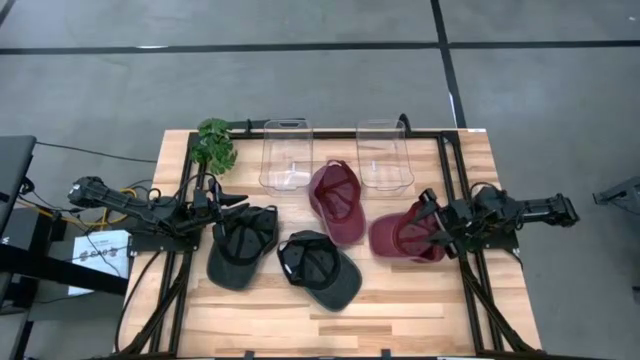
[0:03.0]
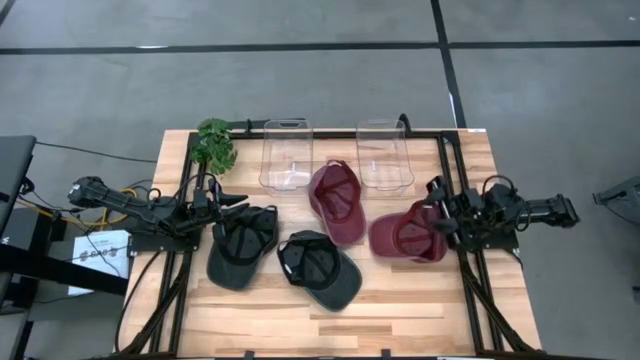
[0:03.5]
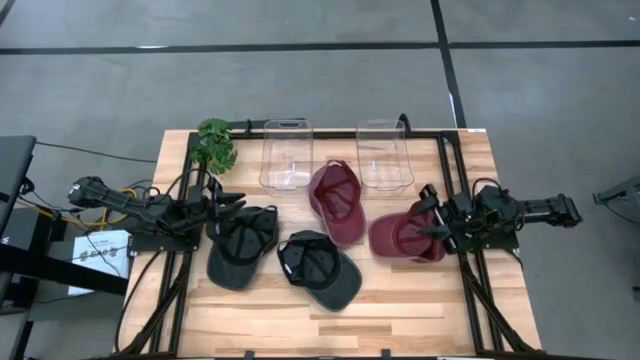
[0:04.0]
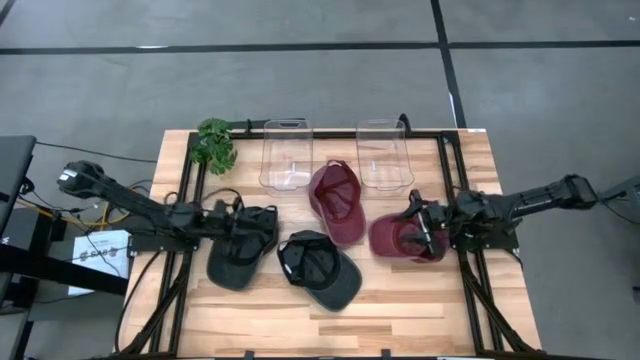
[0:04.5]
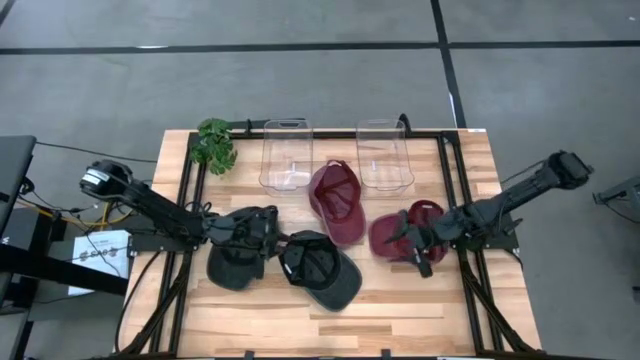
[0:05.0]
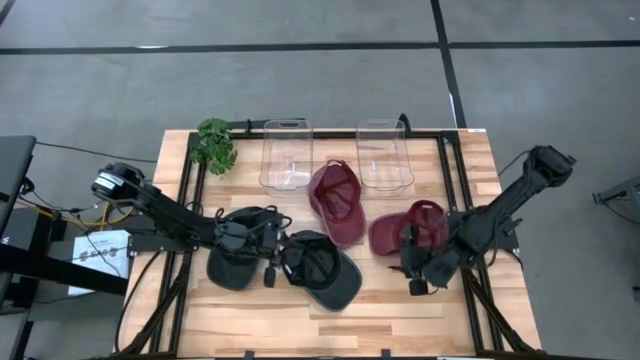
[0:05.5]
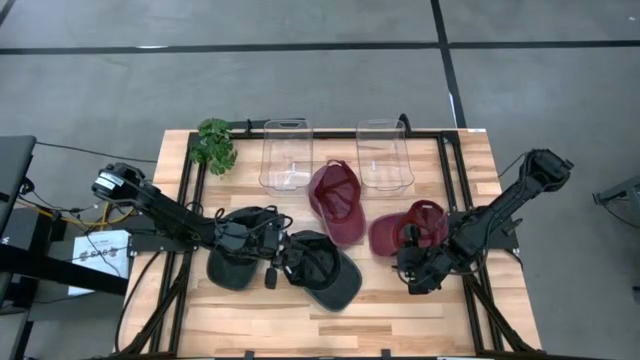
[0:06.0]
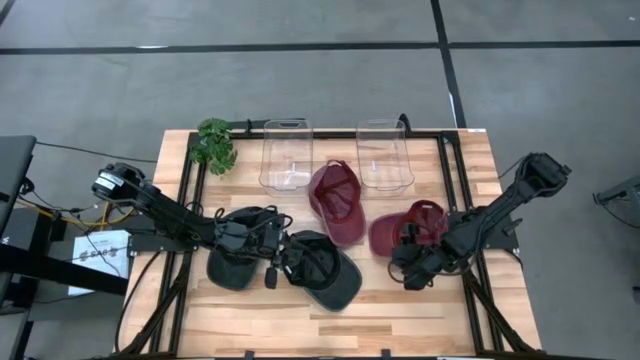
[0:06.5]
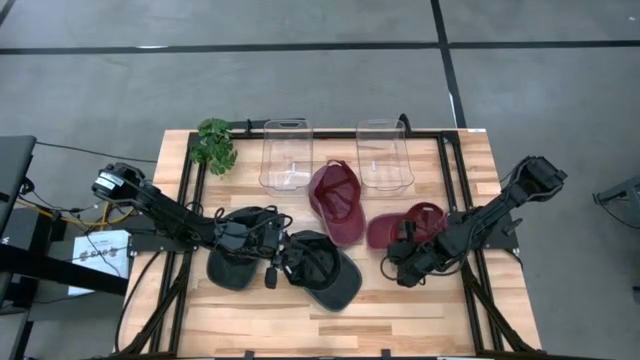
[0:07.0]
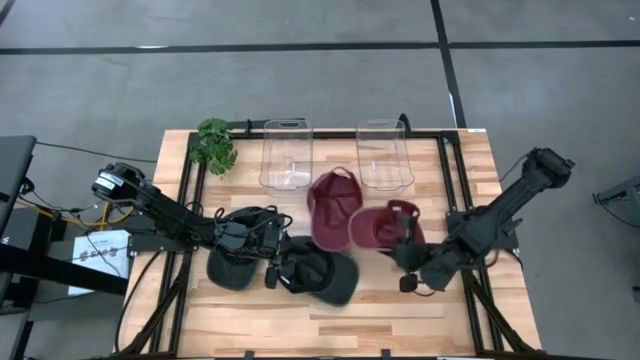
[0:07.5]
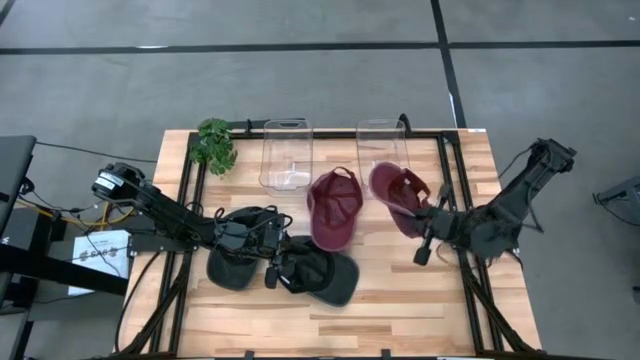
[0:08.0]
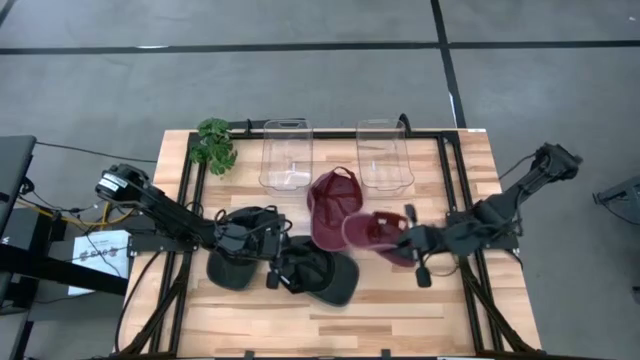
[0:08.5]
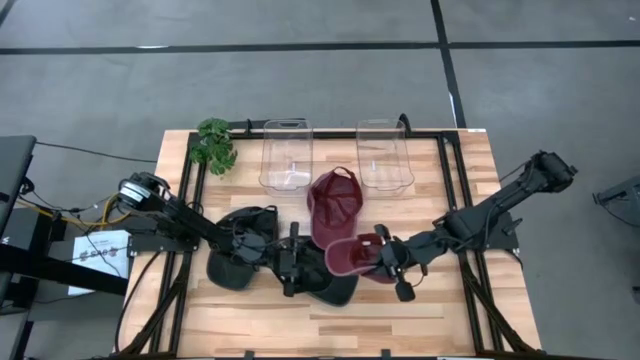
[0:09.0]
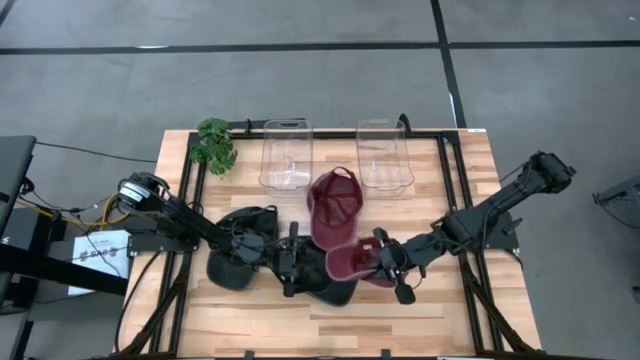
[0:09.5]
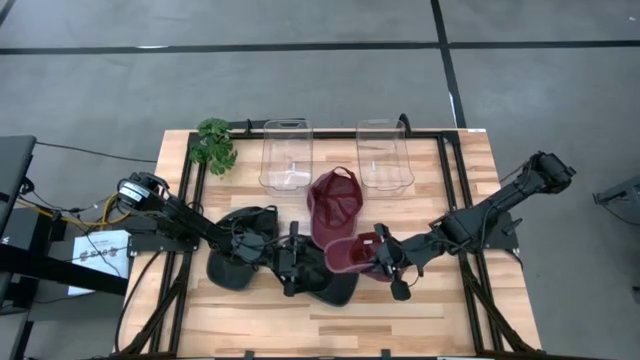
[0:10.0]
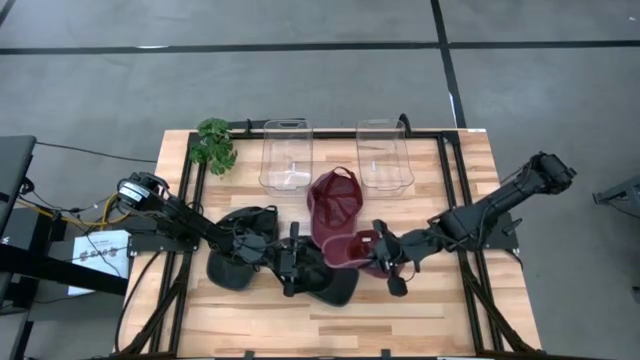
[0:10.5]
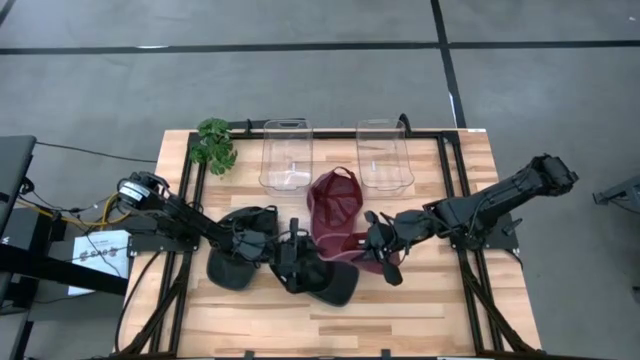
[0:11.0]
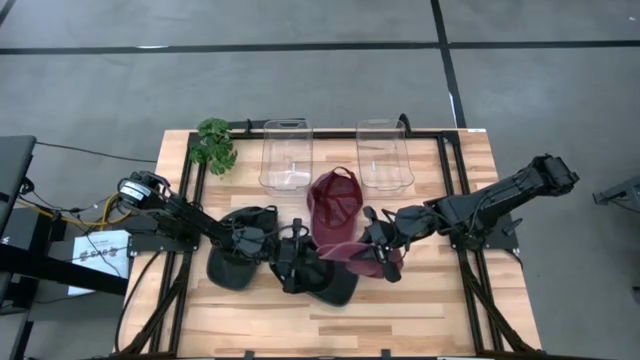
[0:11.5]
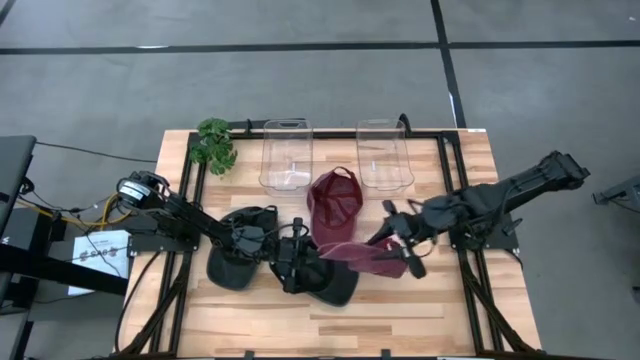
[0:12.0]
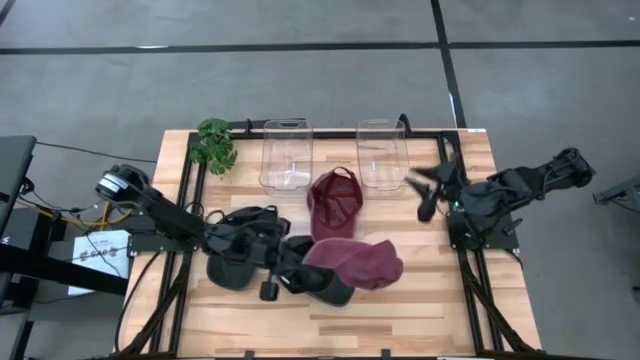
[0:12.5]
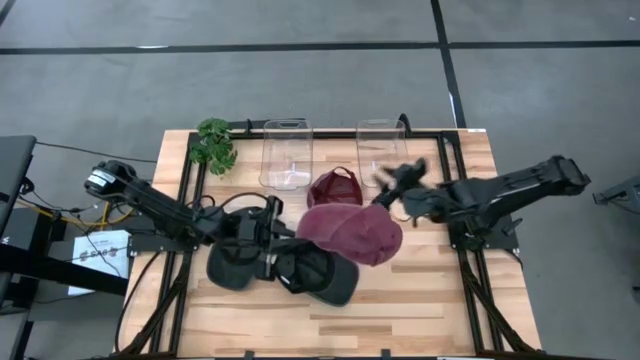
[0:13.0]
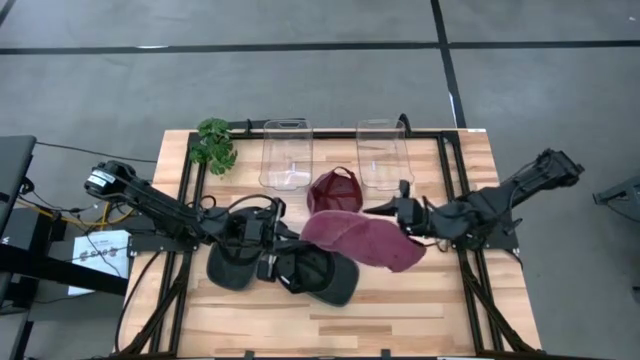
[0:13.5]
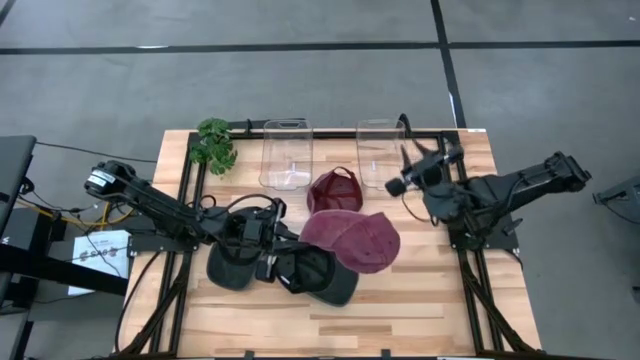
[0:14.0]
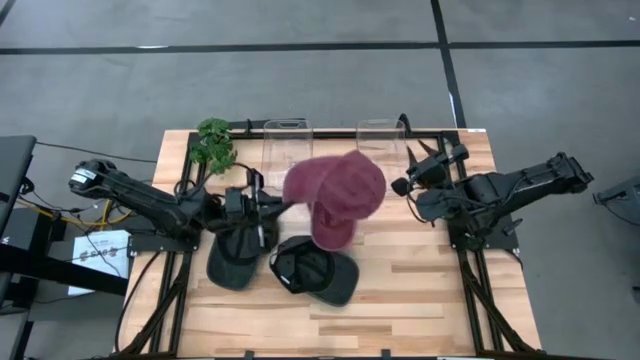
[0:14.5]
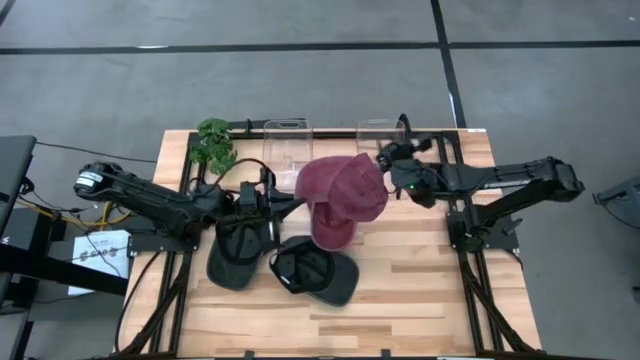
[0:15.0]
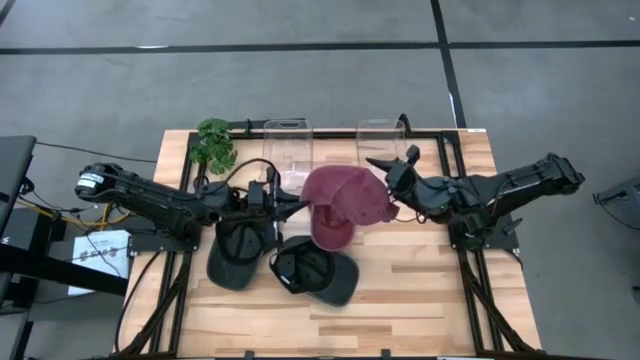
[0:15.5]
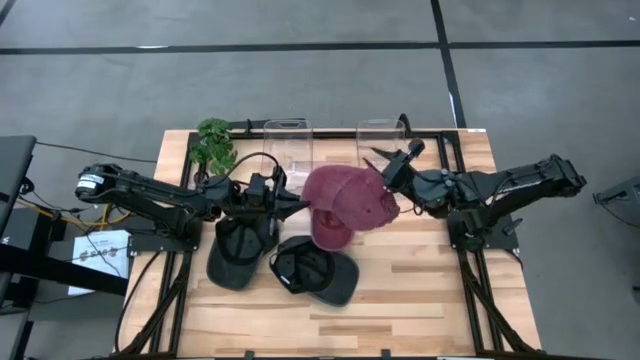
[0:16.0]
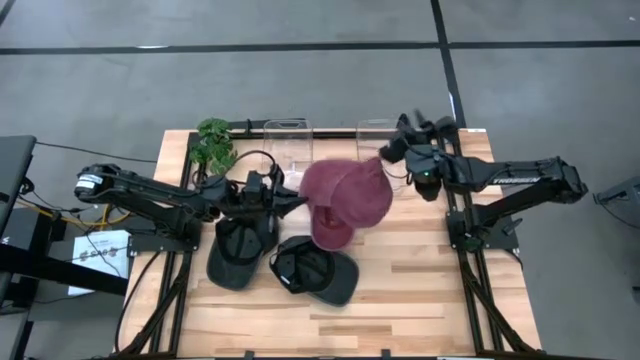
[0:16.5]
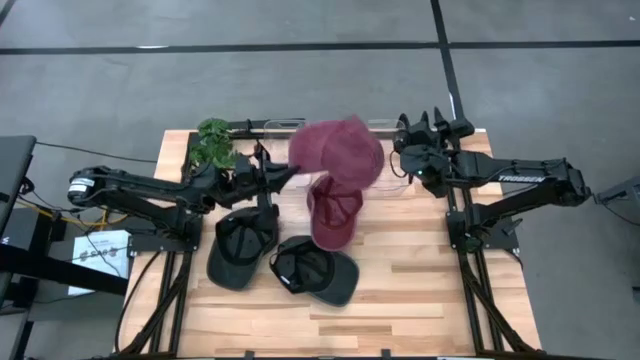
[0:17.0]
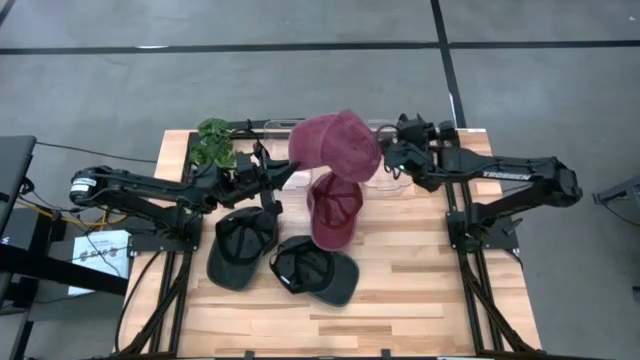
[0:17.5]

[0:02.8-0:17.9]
Task: Pick & Place hat
Put the right red cap into the right transparent bin

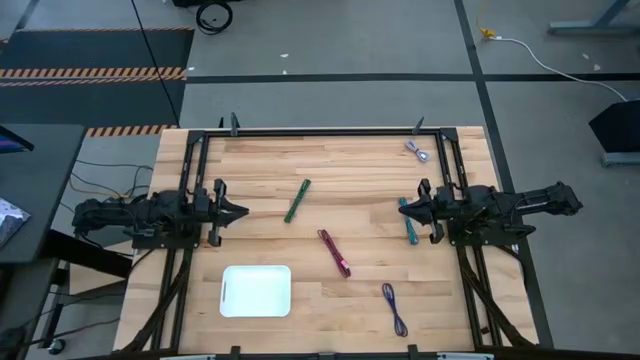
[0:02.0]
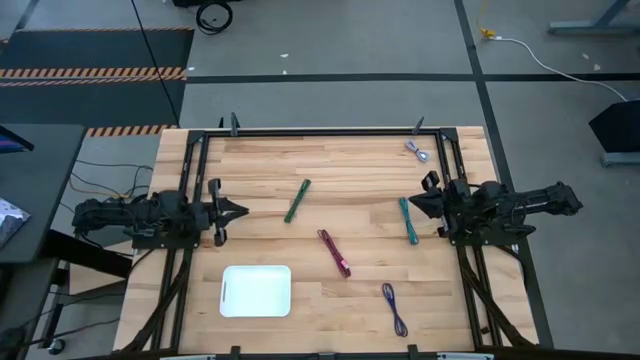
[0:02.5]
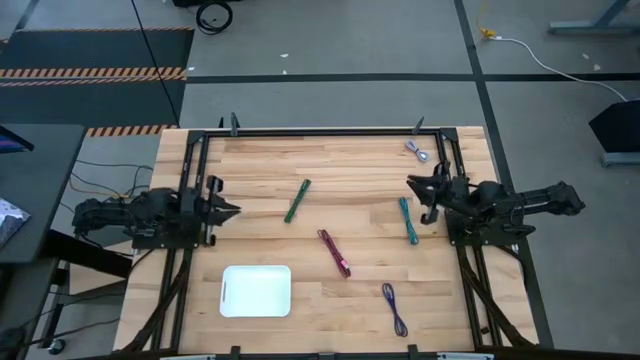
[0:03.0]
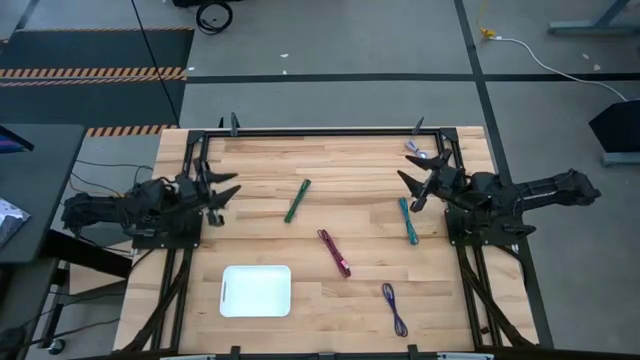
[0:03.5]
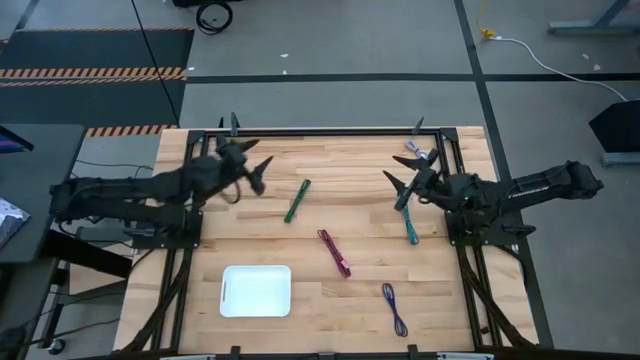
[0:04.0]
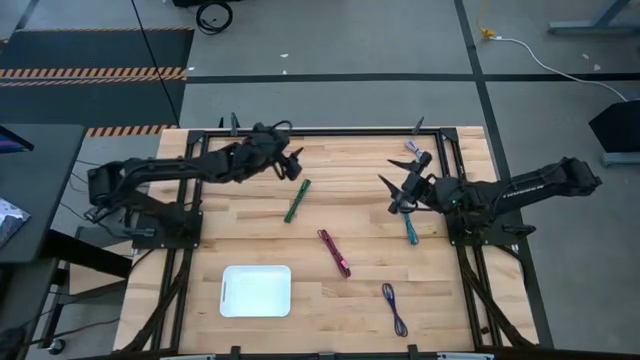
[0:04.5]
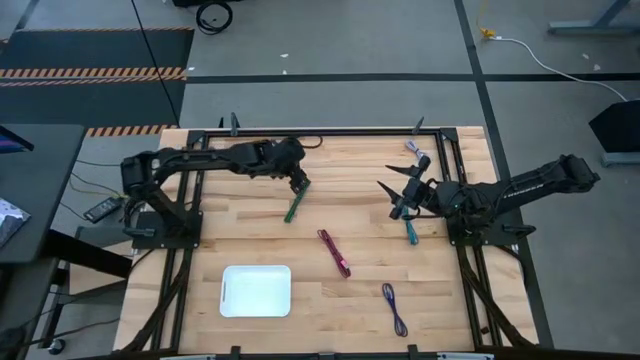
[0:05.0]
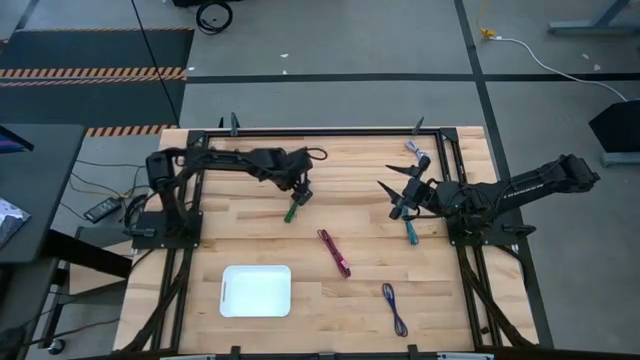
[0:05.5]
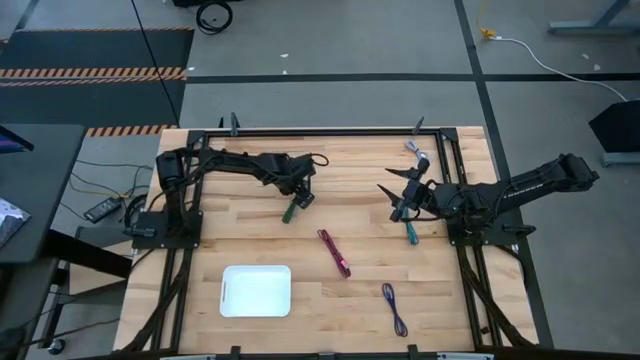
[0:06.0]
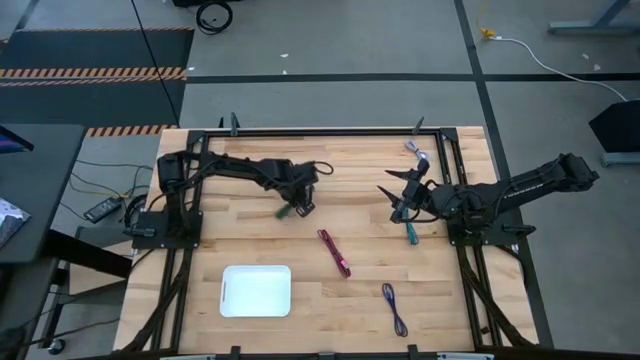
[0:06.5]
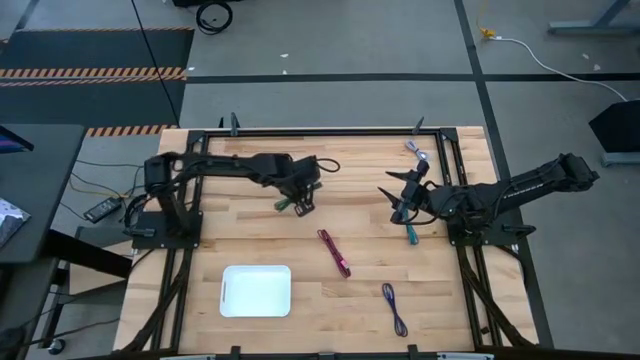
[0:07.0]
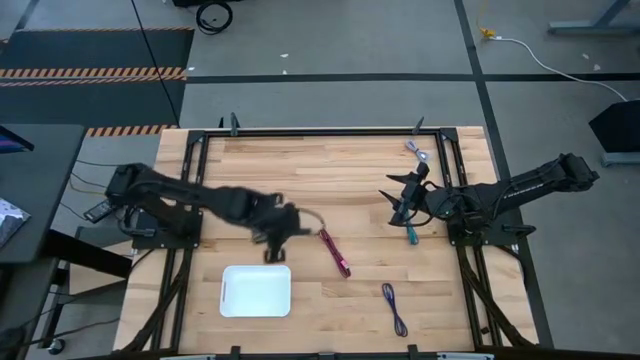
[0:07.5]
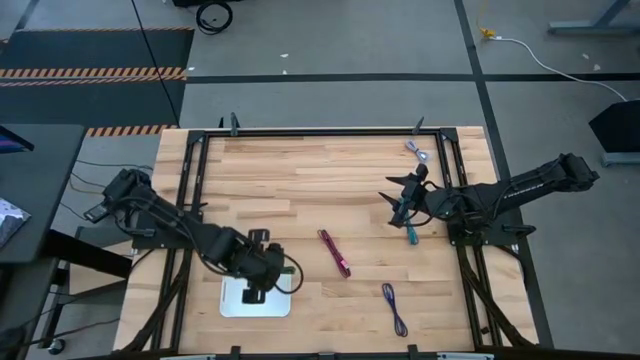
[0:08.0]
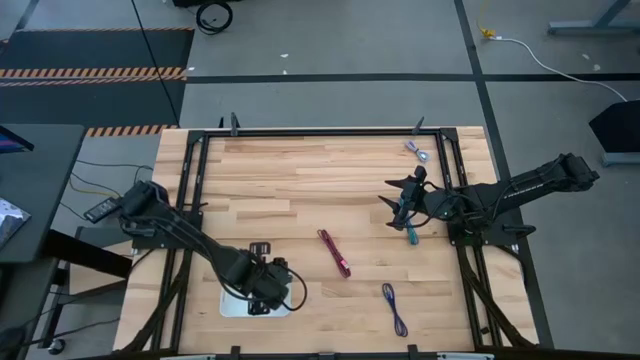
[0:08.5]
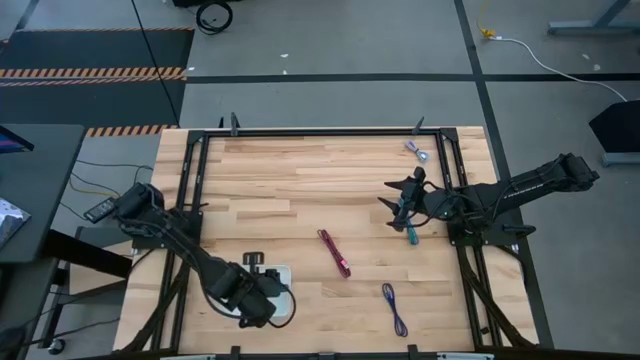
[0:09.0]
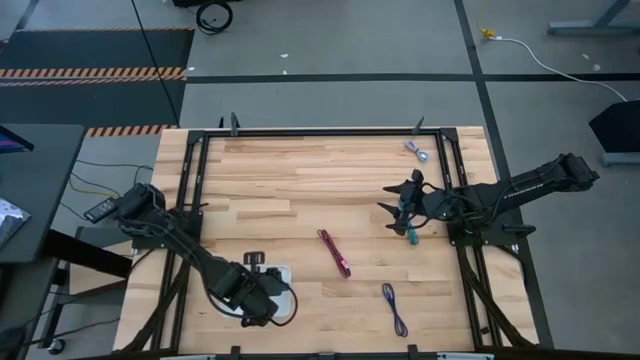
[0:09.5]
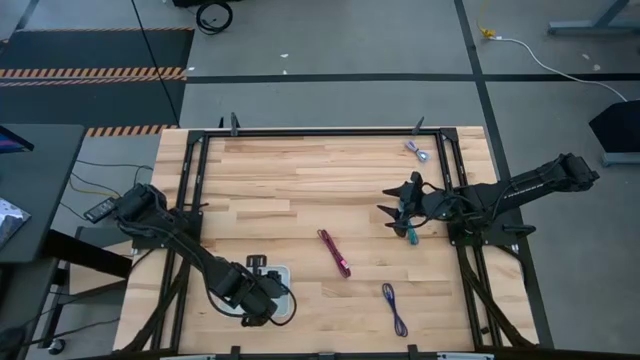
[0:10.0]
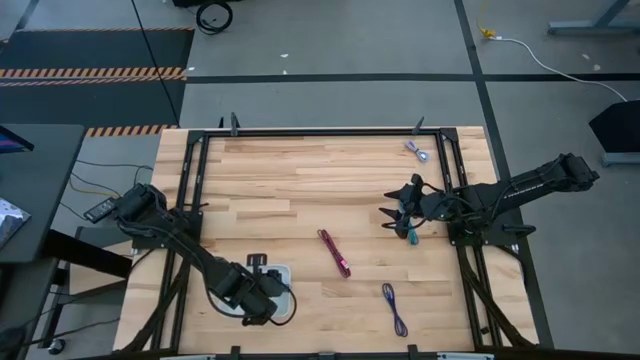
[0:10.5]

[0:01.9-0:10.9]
Task: Pick and place USB-C Cables
Put the green charger cable into the white bin
